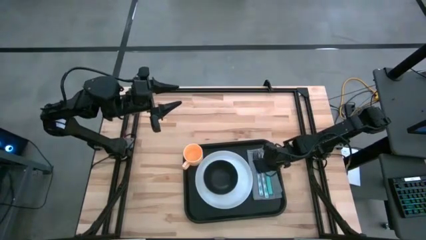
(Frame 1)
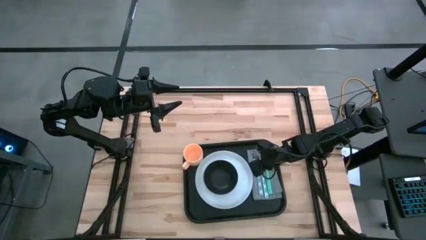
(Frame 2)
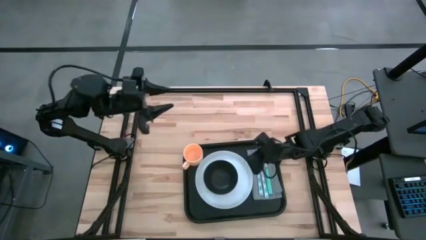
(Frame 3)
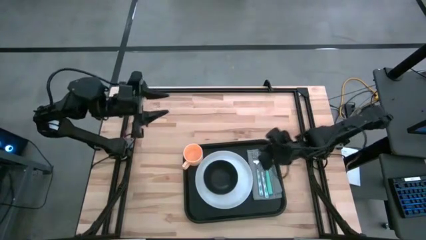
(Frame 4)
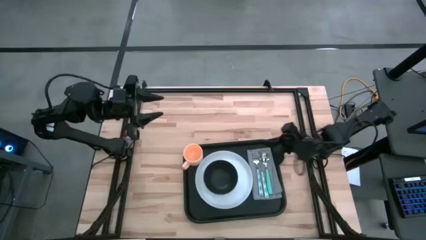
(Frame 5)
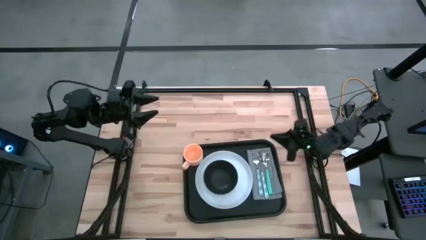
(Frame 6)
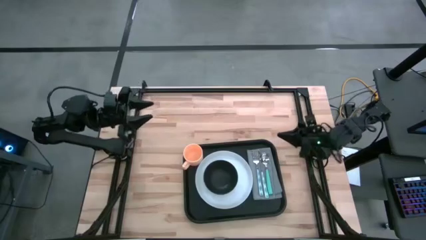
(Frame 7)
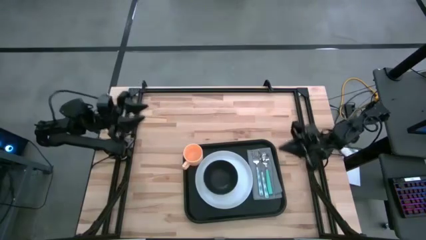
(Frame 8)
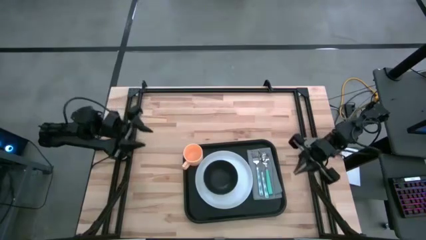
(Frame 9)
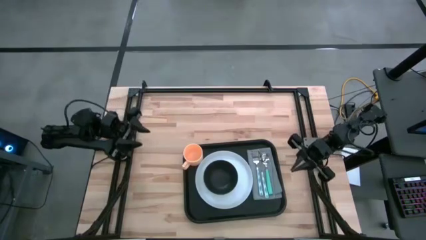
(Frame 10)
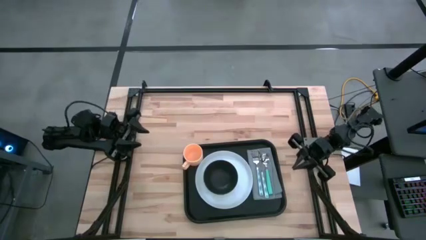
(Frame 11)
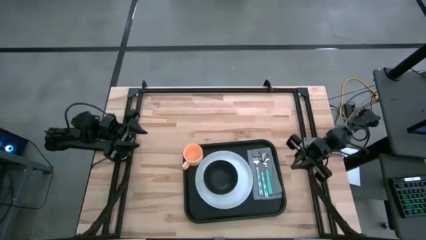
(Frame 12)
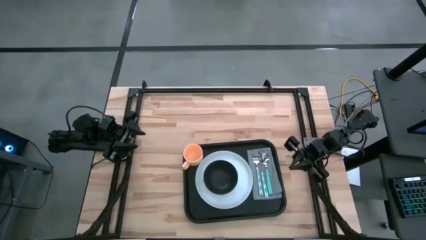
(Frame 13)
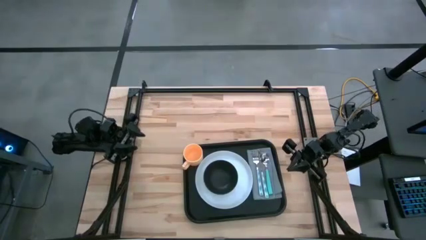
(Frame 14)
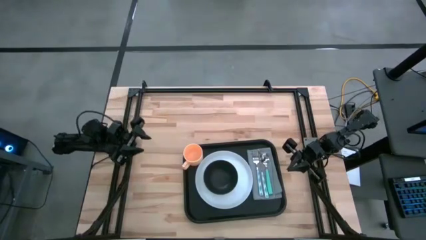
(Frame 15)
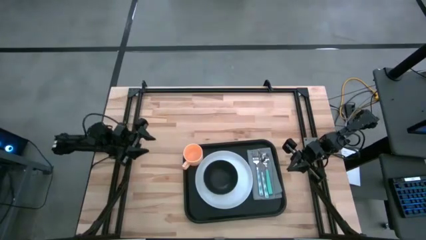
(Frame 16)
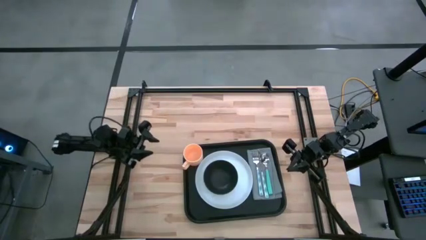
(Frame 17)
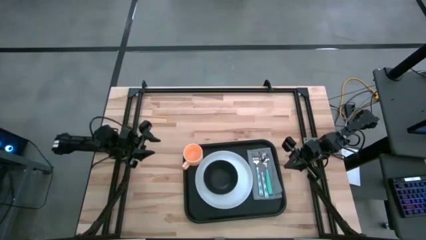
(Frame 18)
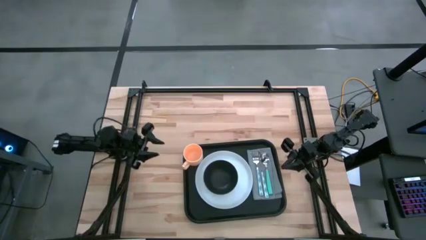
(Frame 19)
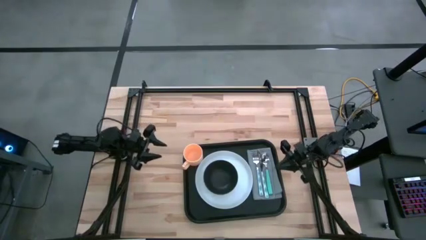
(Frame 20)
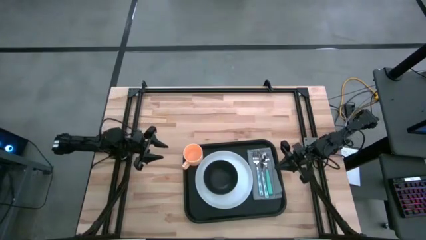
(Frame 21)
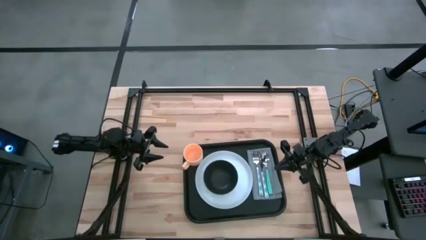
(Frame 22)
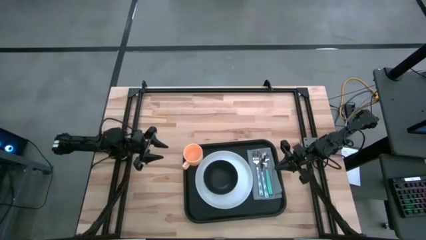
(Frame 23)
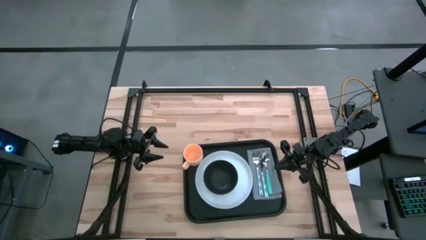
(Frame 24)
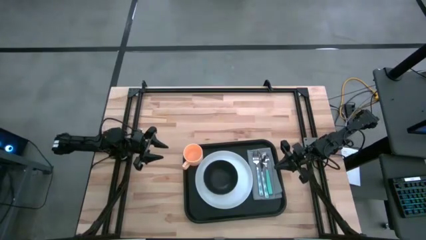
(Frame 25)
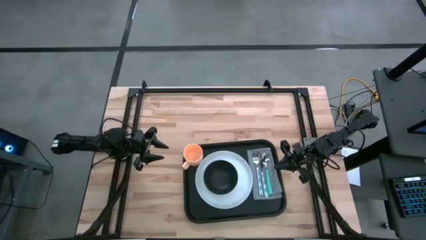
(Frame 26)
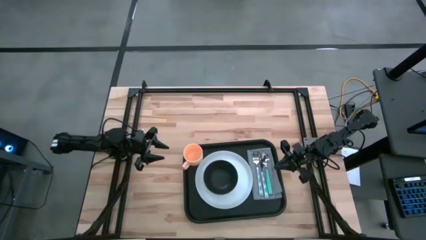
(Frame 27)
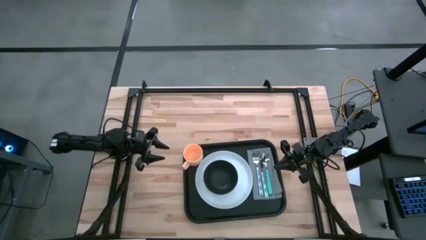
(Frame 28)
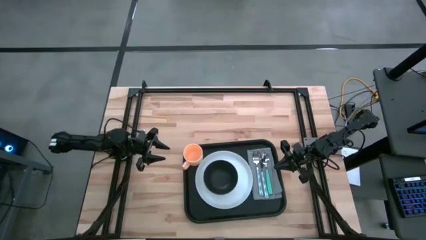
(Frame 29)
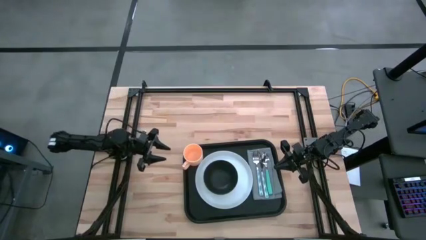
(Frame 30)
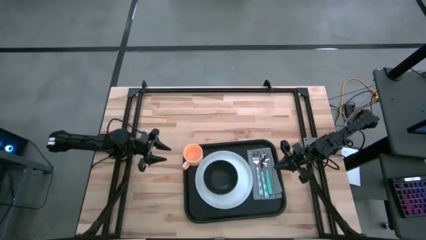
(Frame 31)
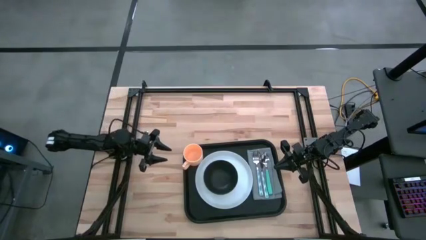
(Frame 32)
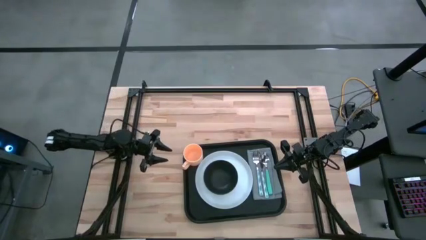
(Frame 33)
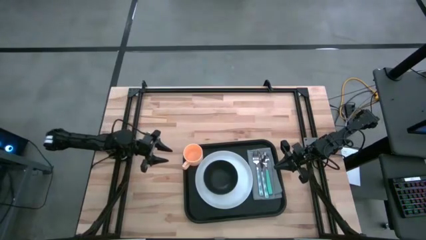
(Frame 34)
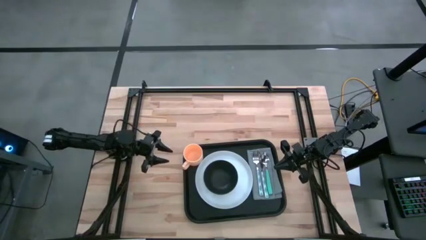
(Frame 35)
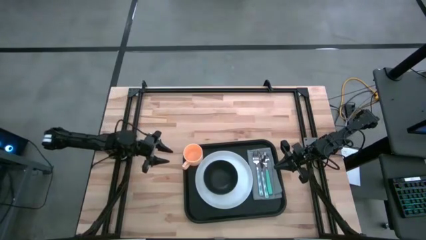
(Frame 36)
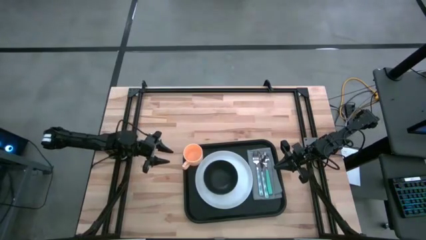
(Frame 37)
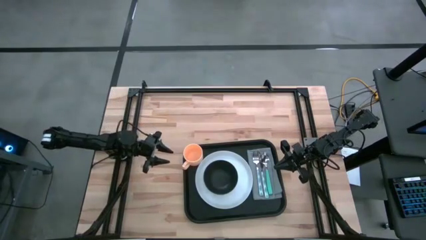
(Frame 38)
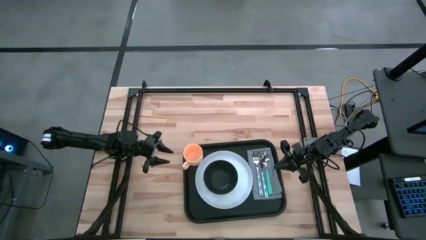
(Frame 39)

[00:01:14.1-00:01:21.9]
Task: Set up tray
Return to Home Position

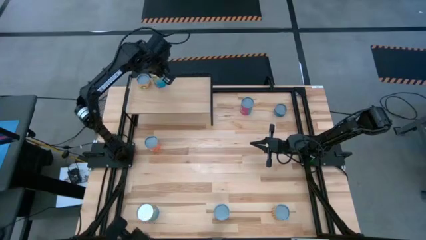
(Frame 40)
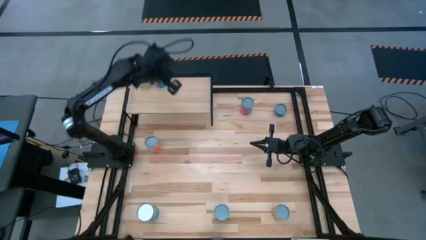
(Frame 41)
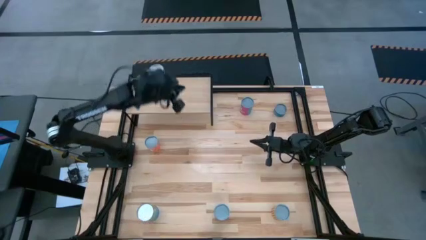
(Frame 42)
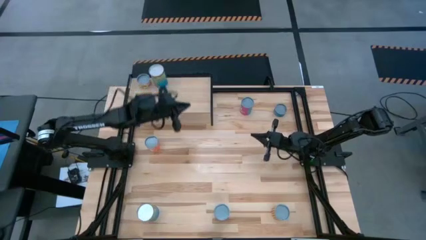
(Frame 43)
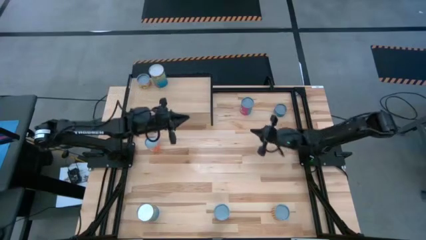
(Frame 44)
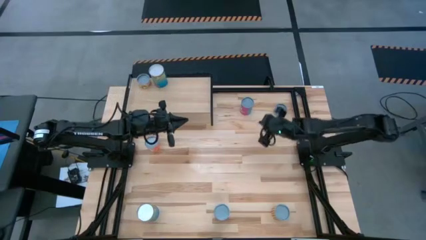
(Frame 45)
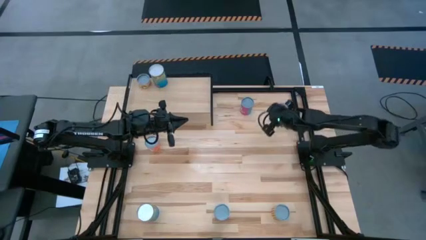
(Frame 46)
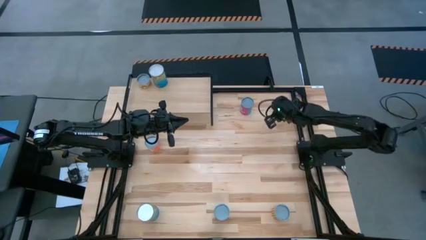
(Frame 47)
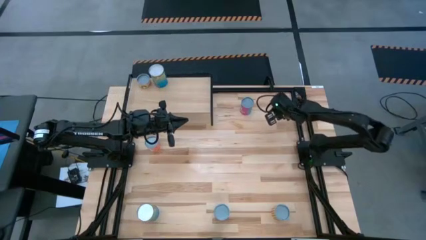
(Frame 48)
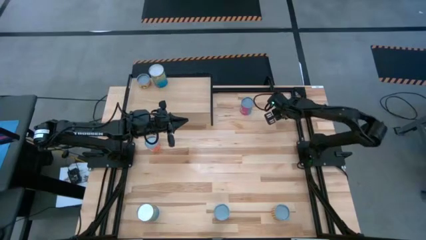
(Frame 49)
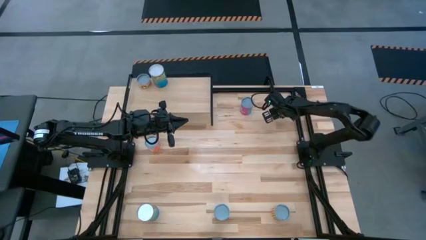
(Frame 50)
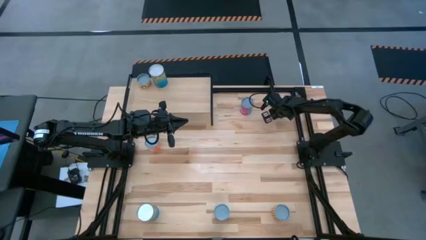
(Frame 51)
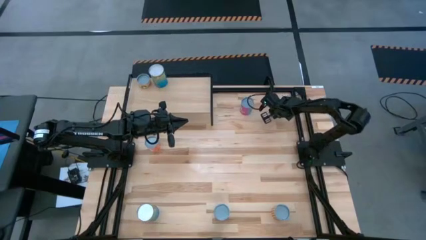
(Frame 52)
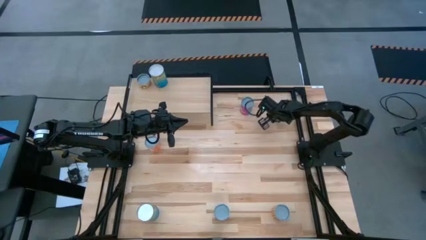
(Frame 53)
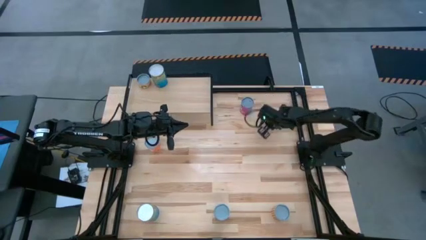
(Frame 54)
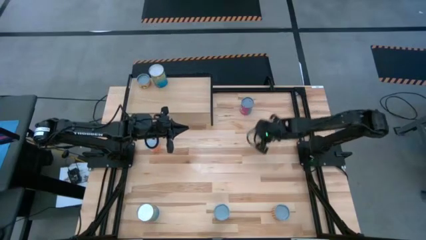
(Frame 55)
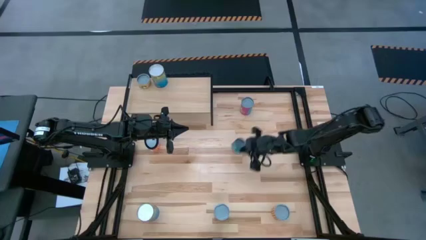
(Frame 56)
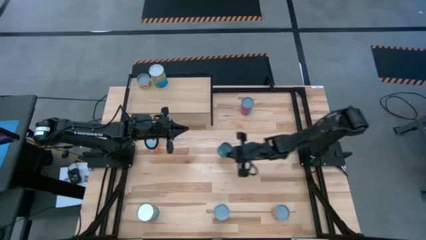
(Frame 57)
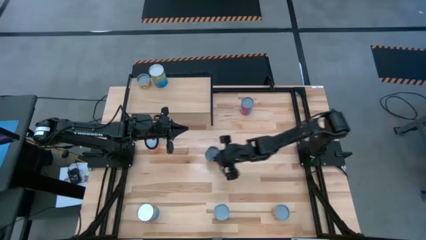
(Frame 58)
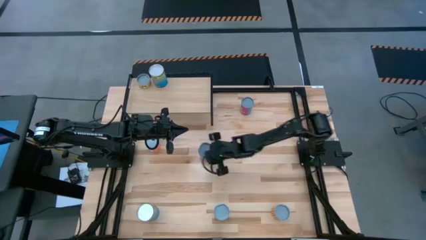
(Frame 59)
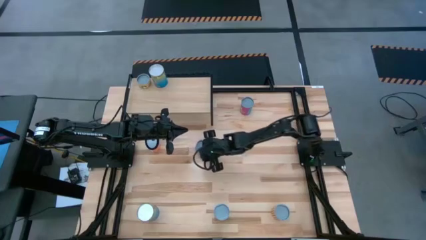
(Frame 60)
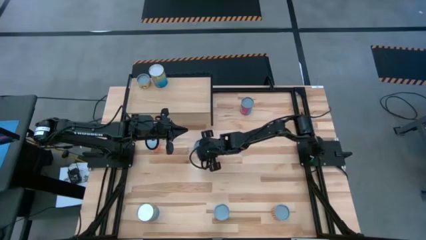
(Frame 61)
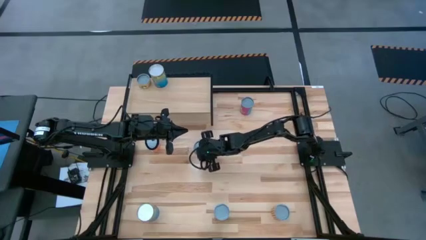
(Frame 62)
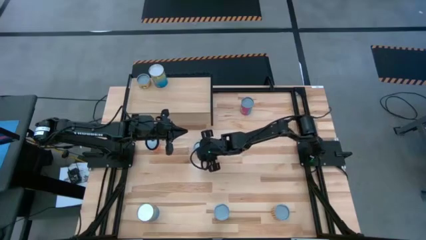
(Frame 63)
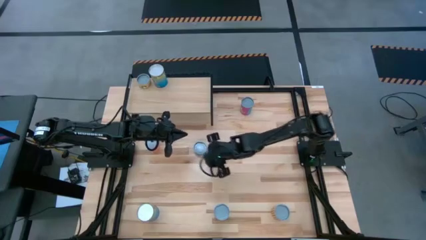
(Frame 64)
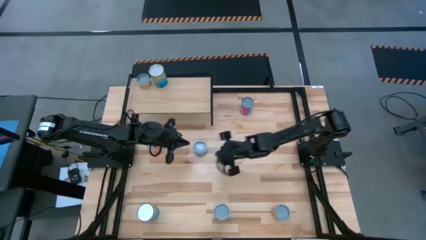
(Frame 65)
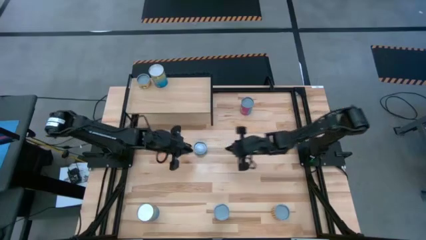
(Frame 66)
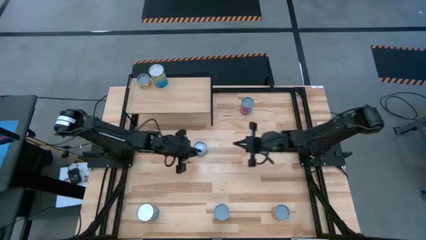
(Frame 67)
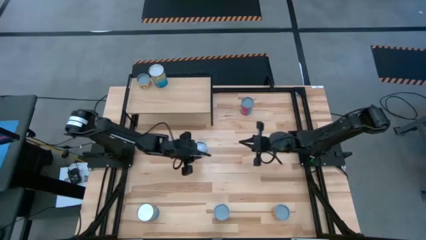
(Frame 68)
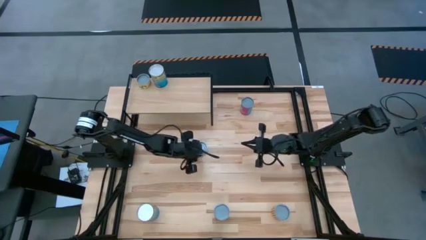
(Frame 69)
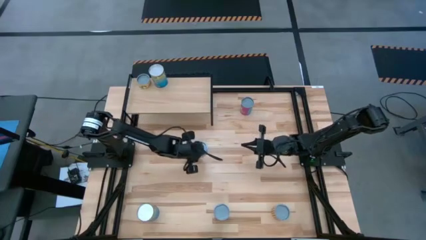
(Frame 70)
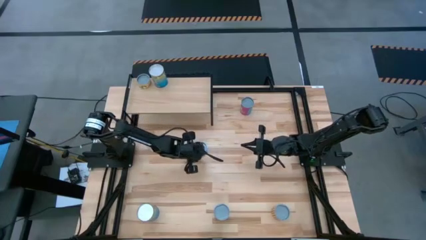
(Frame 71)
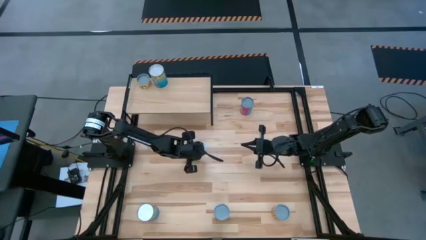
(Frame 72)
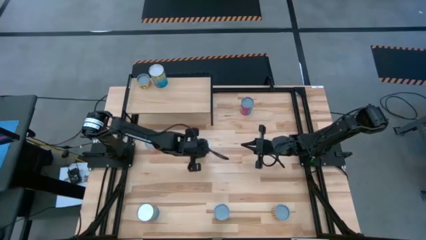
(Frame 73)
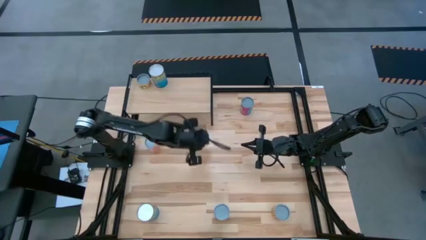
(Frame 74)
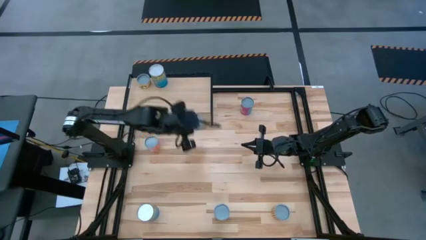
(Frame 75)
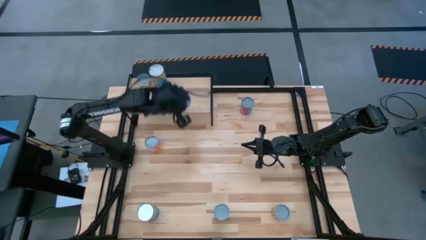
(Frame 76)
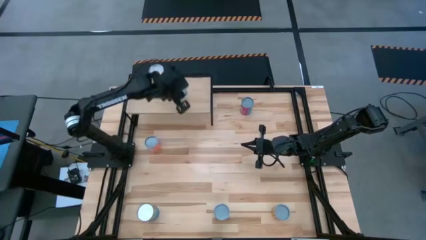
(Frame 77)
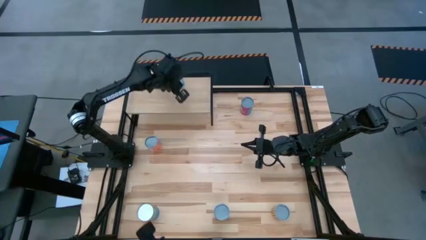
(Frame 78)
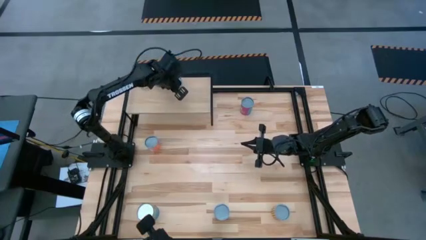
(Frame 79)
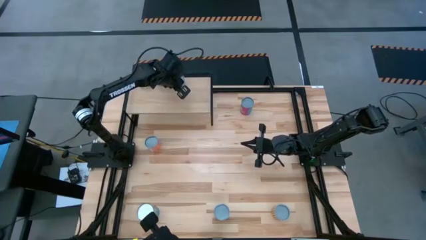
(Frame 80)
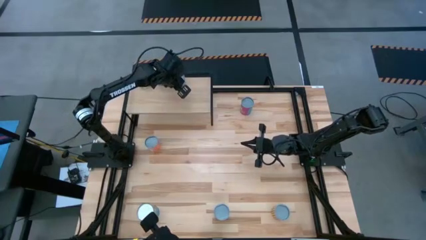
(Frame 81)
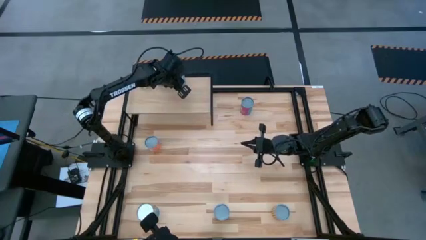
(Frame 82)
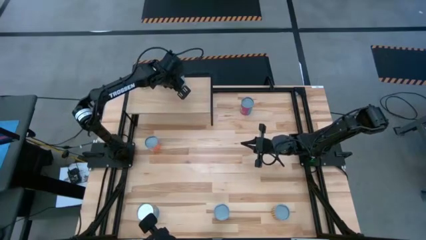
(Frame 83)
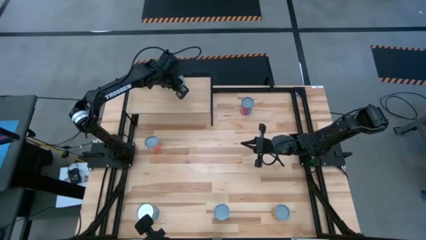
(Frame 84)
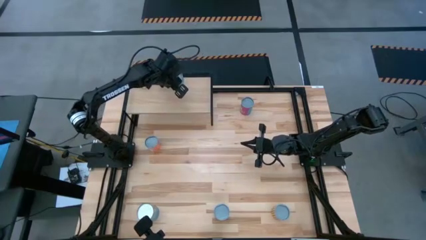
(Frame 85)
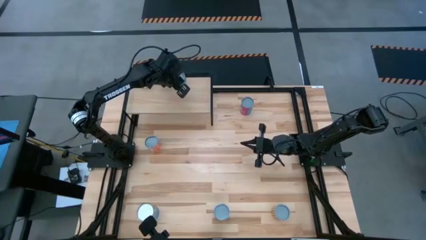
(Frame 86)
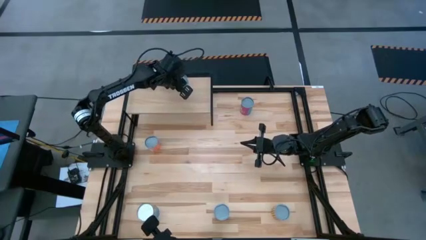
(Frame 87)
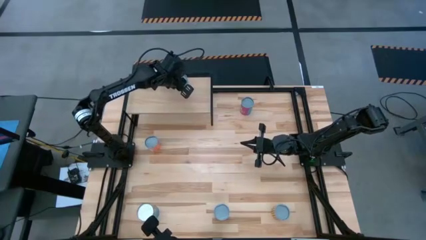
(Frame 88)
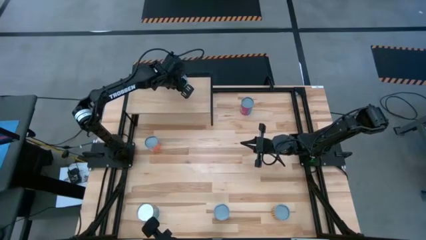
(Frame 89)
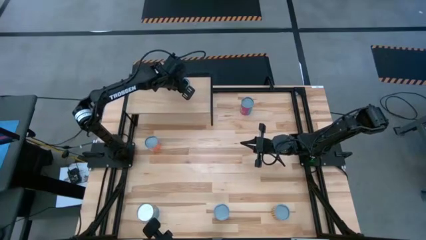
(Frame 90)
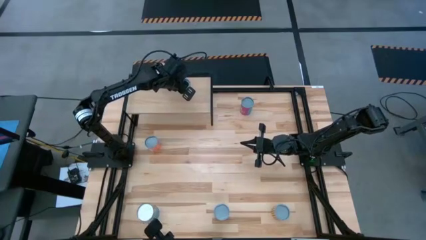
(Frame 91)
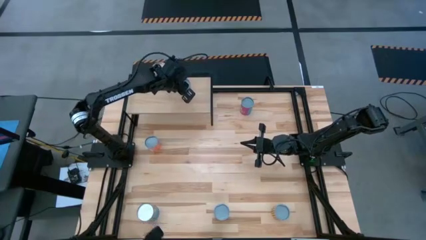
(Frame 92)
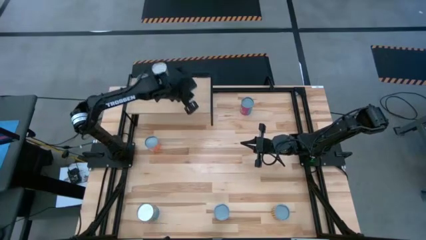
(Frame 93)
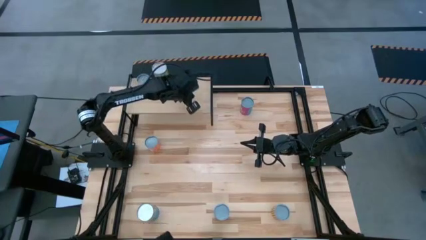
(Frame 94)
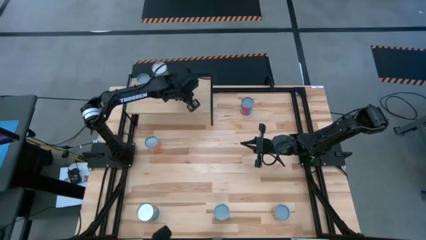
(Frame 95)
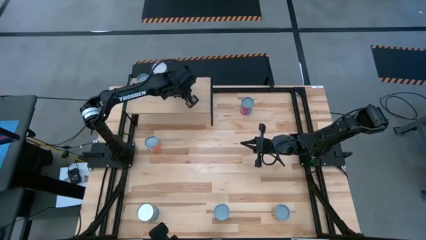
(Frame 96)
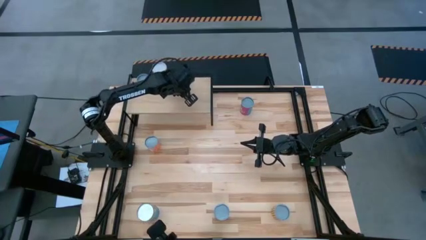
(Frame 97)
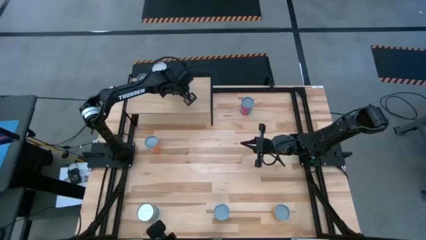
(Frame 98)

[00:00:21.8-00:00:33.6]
Task: Pick and place cans onto a shelf
Put the canned tuna fish on the shelf
